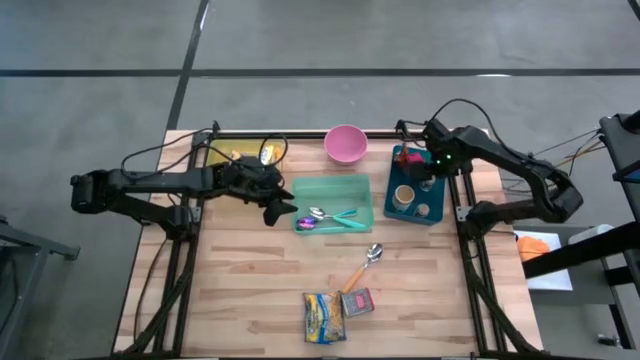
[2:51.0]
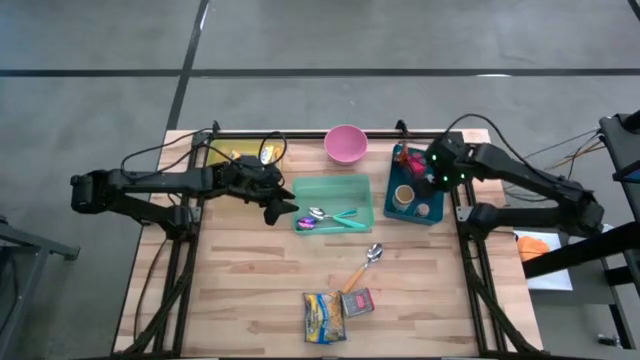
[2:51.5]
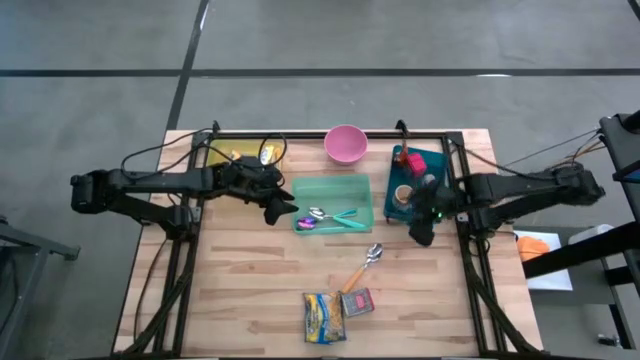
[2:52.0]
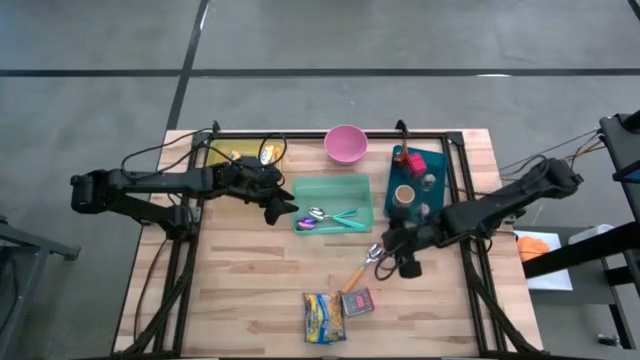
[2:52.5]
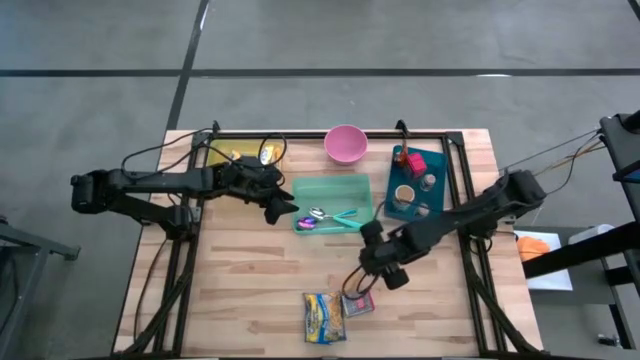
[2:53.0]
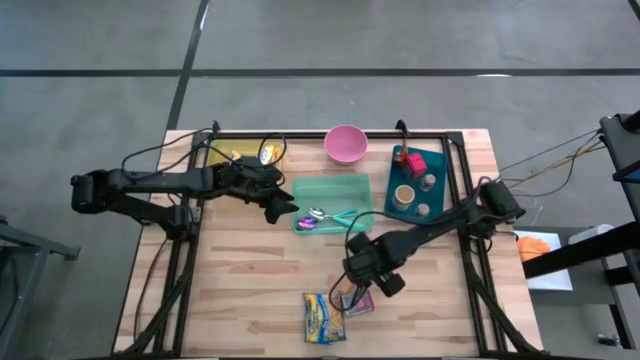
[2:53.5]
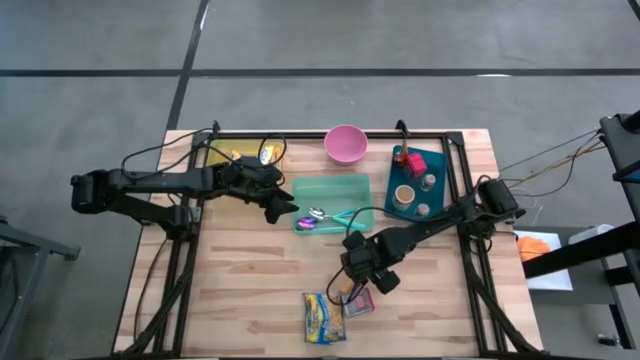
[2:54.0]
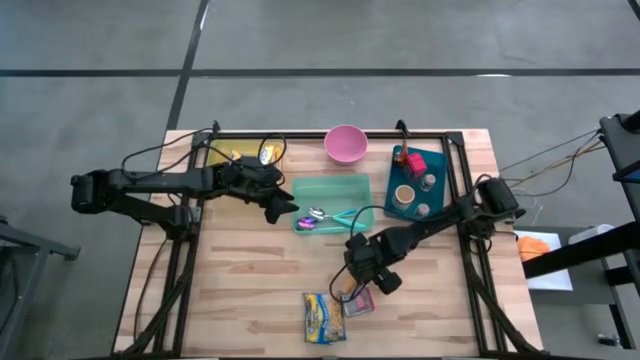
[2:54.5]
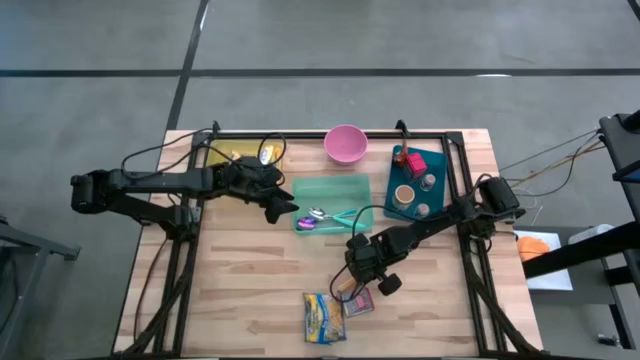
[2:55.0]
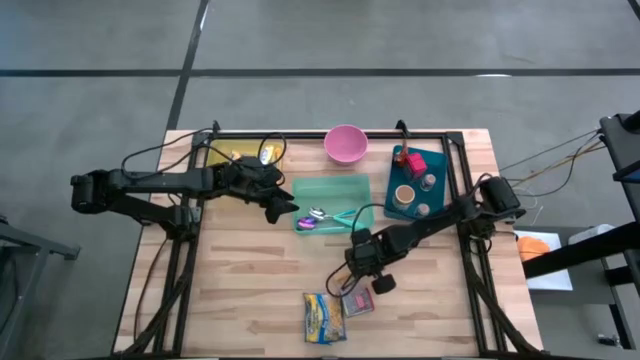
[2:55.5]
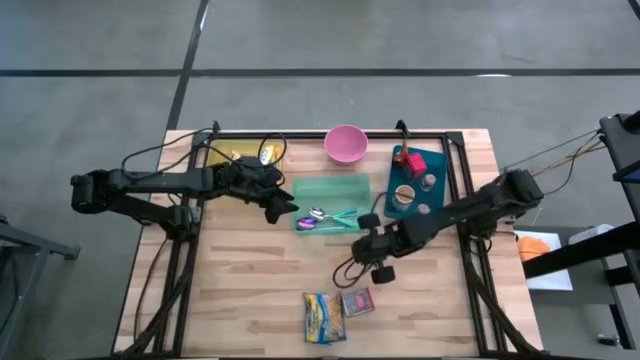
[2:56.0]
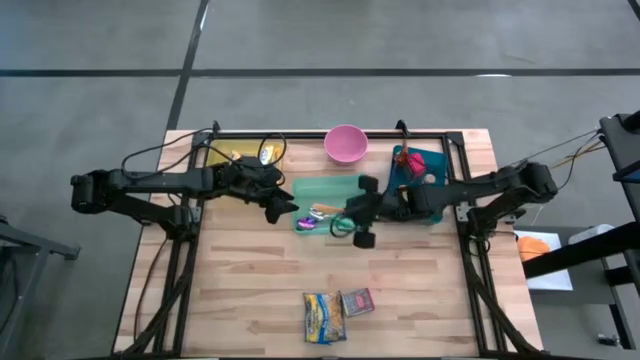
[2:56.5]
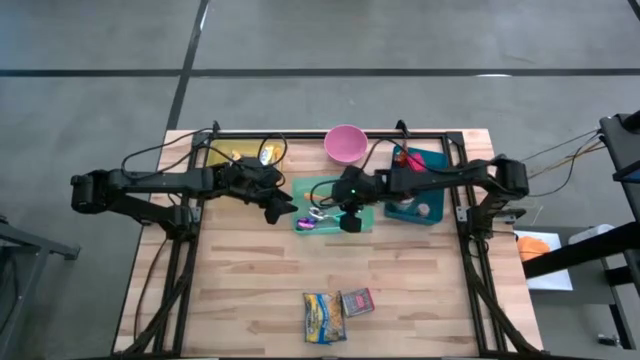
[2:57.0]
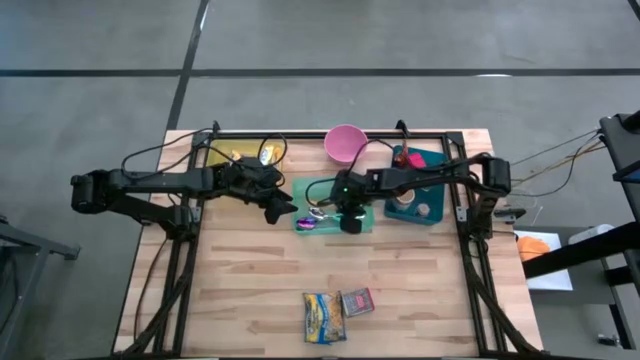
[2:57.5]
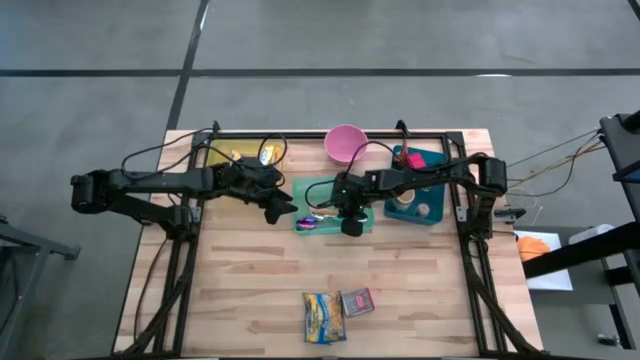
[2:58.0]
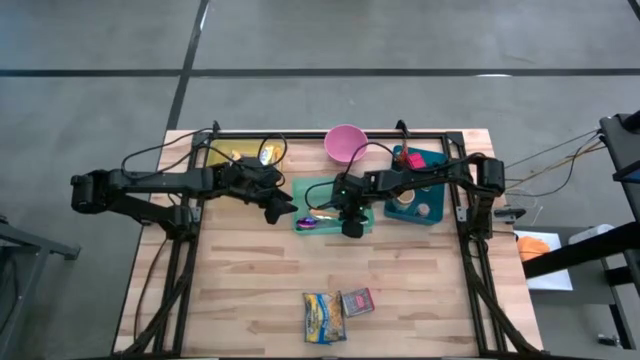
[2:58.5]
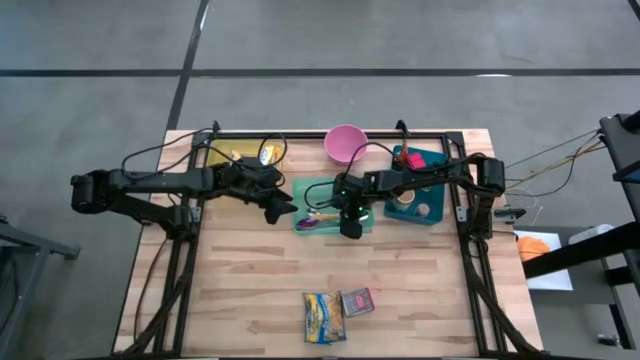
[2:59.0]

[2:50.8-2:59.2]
Put the yellow spoon into the green bin

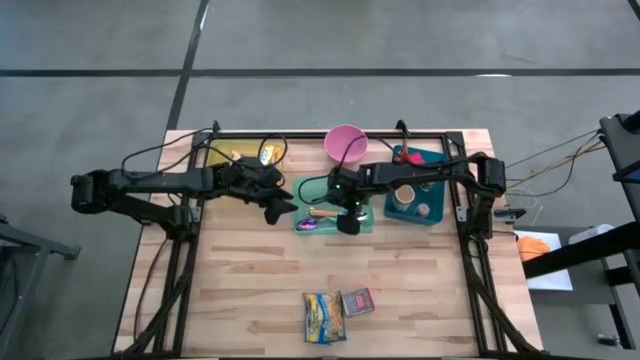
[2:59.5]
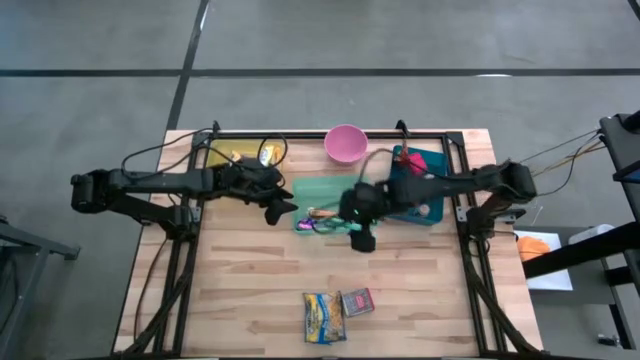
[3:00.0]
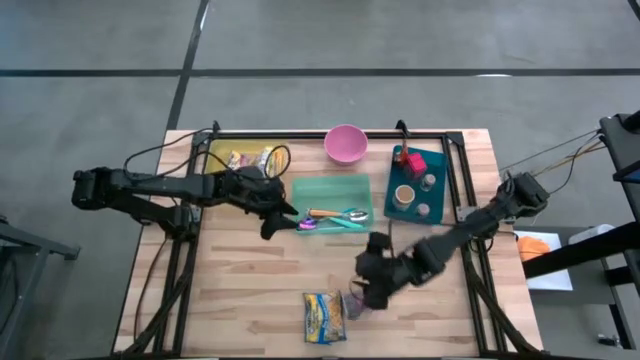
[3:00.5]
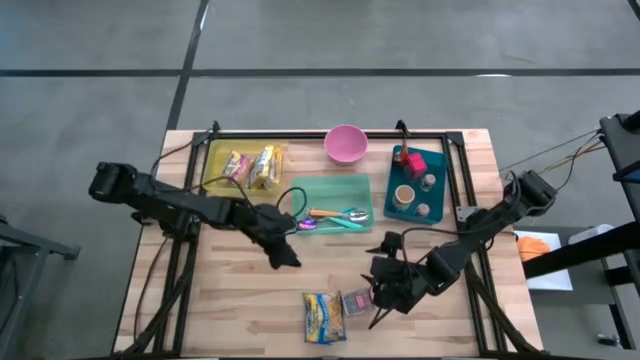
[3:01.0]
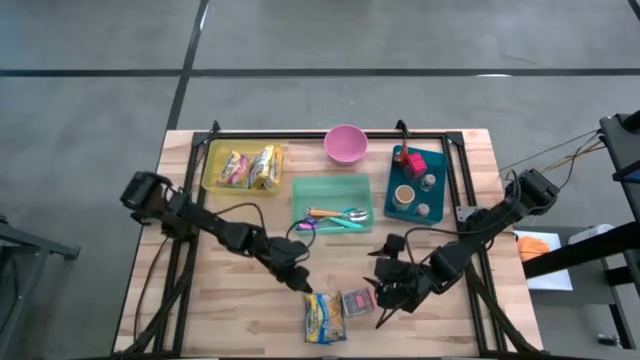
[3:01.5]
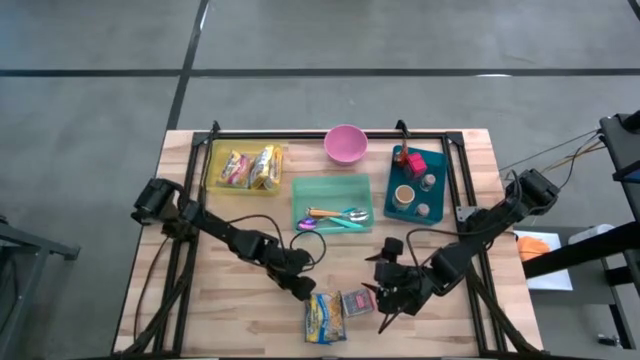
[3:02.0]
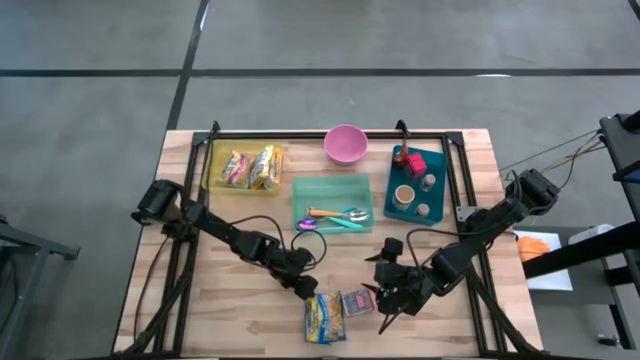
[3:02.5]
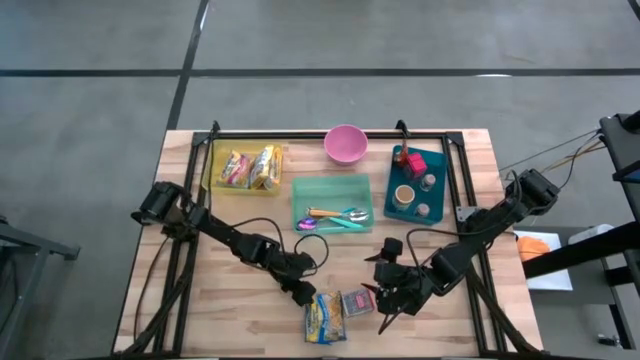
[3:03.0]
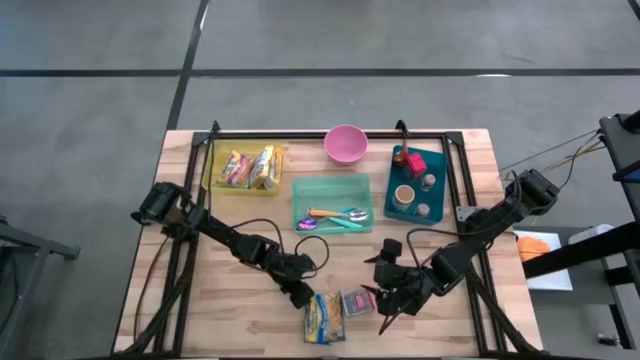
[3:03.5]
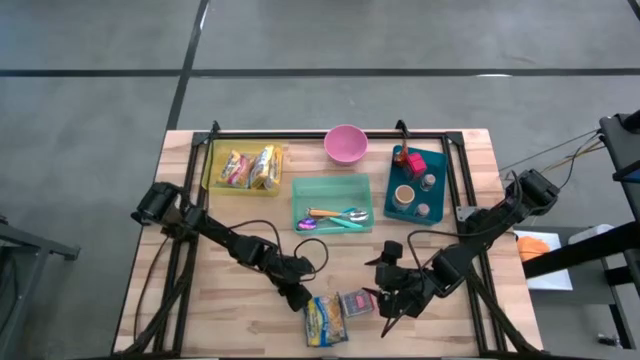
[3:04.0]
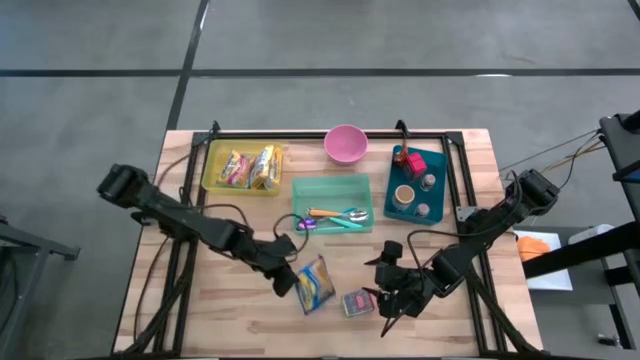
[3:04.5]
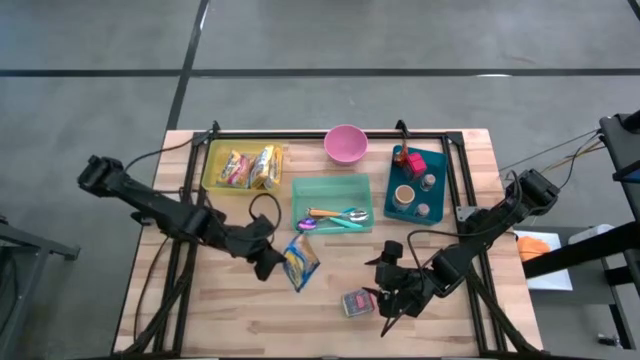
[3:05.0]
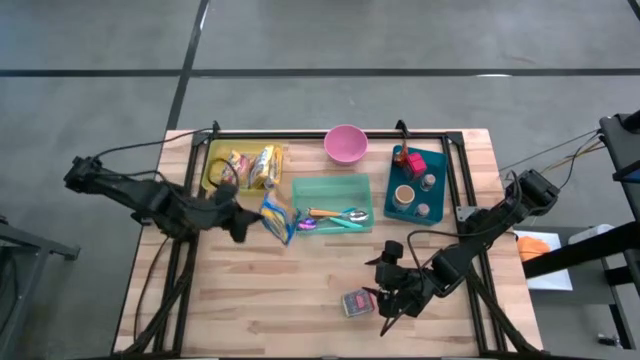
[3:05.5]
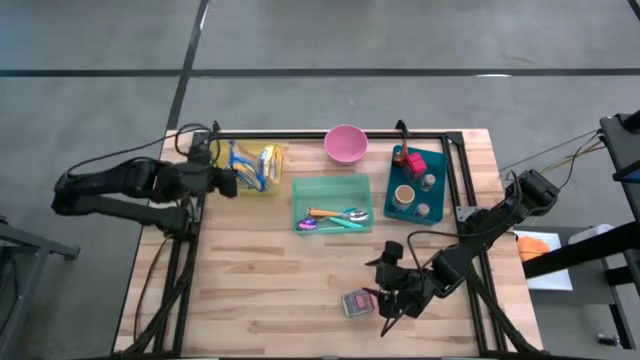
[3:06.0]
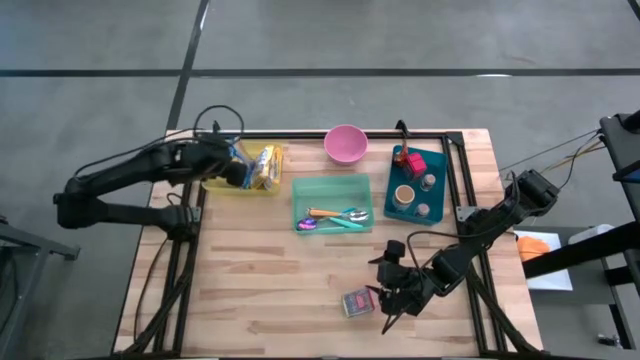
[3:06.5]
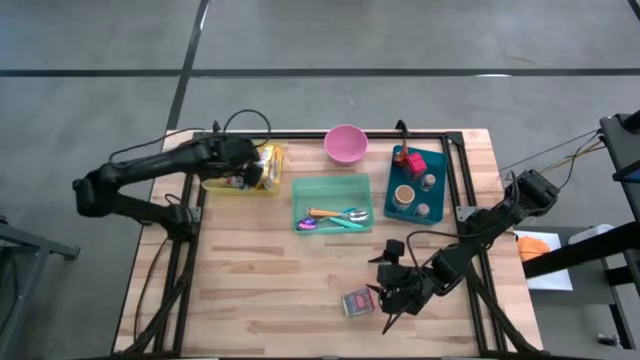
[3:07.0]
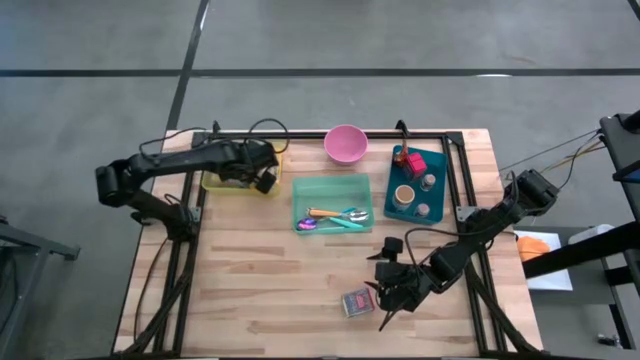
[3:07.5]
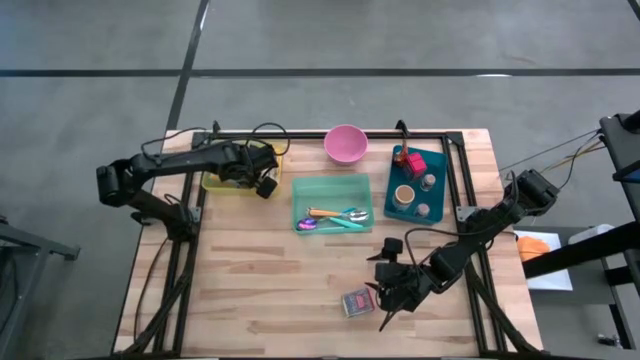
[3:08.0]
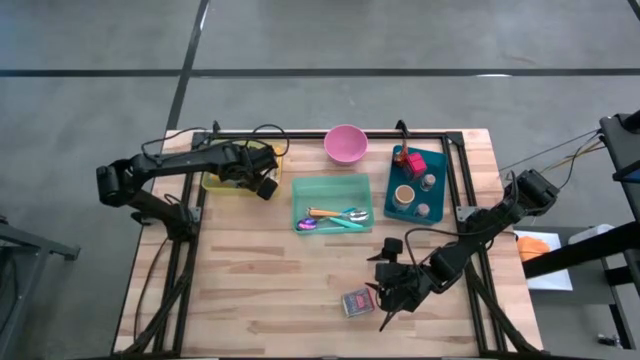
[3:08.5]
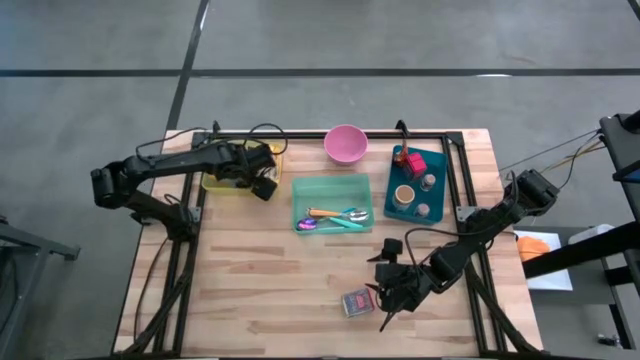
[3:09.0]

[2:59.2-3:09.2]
Put the blue noodle pack into the yellow bin
